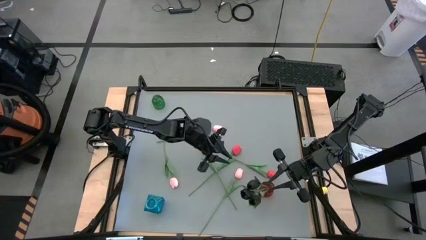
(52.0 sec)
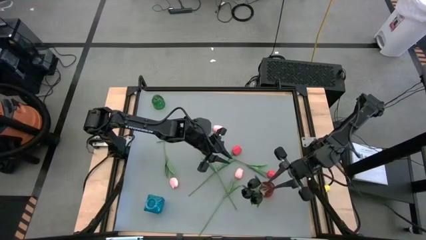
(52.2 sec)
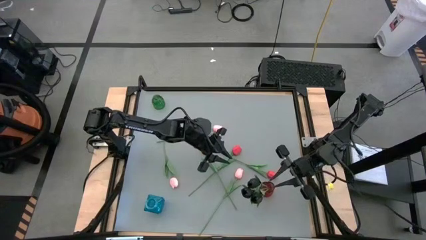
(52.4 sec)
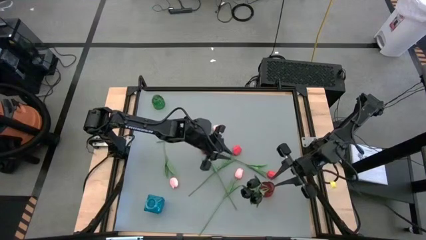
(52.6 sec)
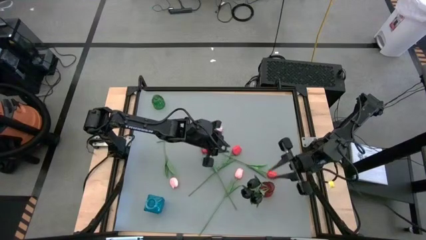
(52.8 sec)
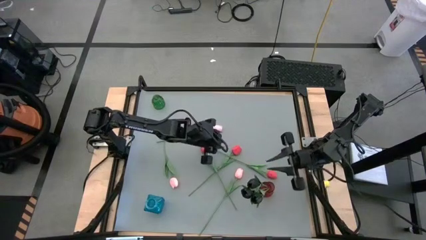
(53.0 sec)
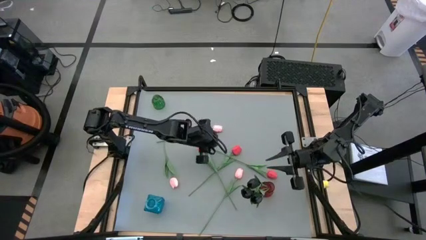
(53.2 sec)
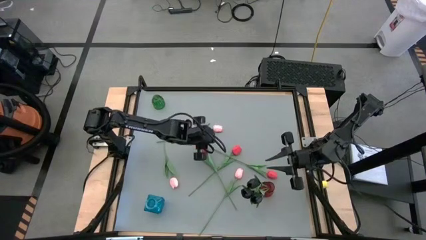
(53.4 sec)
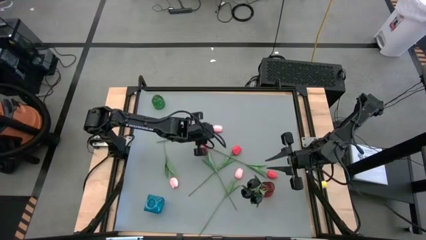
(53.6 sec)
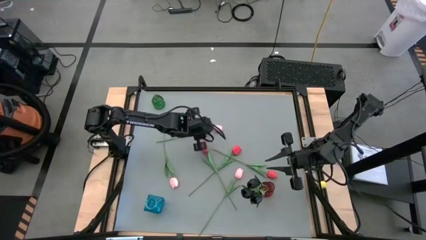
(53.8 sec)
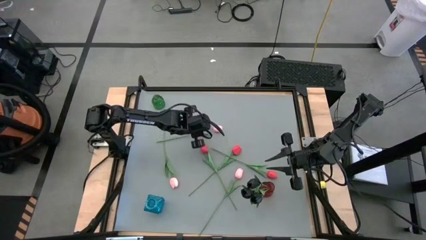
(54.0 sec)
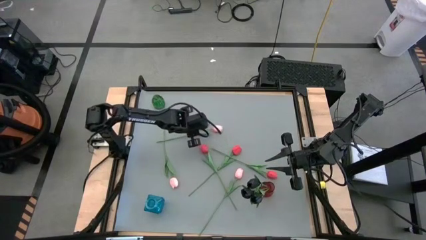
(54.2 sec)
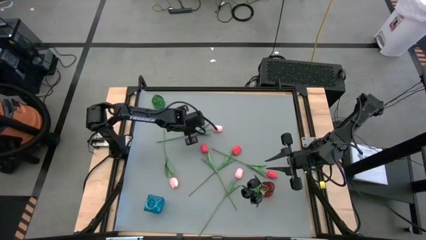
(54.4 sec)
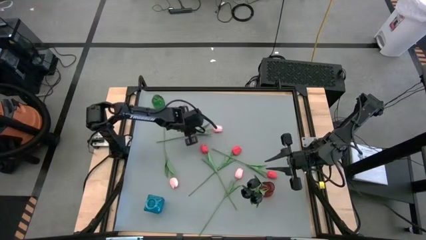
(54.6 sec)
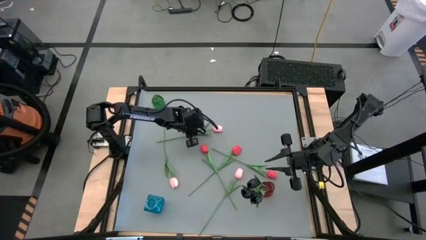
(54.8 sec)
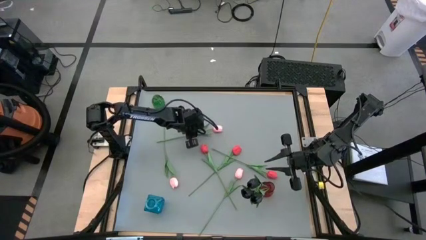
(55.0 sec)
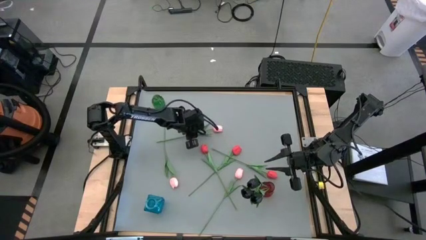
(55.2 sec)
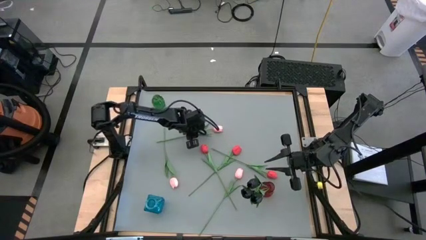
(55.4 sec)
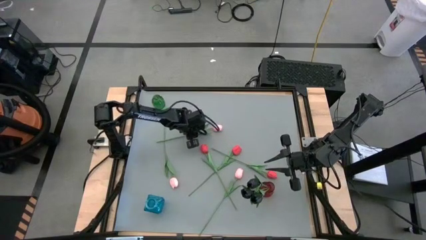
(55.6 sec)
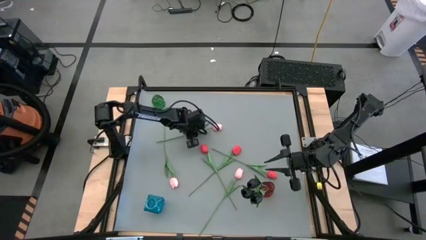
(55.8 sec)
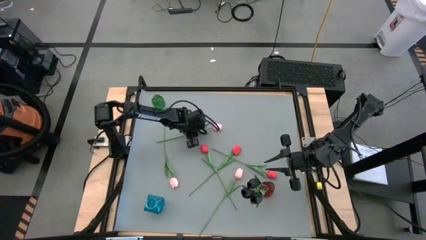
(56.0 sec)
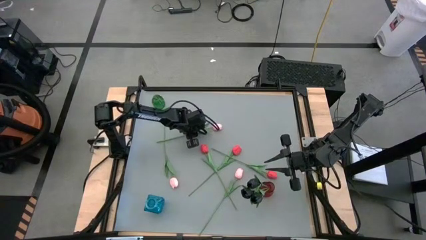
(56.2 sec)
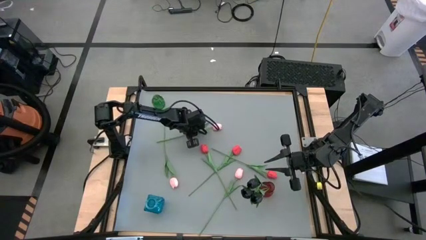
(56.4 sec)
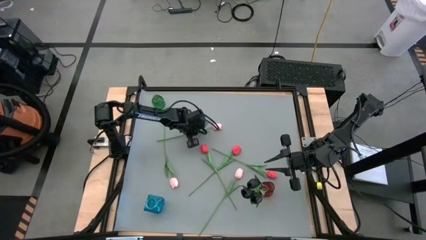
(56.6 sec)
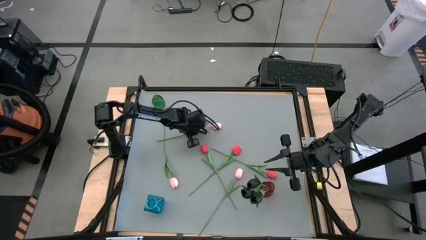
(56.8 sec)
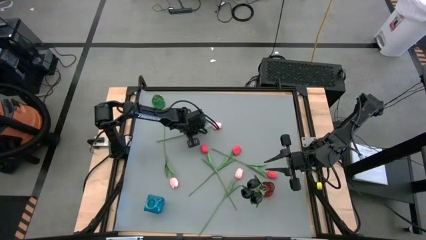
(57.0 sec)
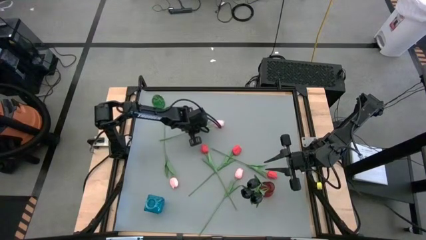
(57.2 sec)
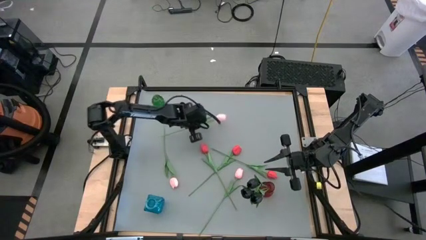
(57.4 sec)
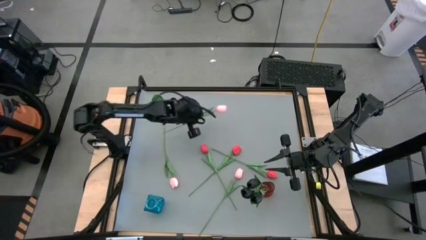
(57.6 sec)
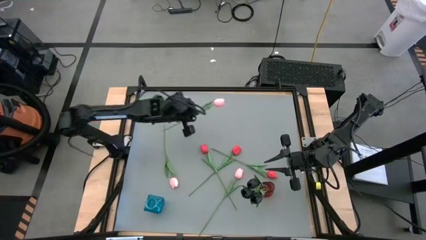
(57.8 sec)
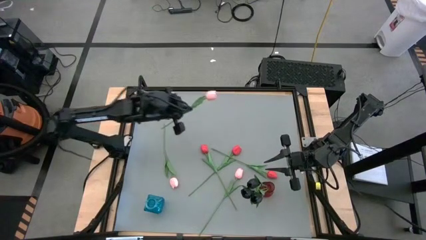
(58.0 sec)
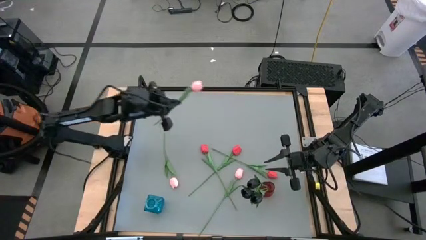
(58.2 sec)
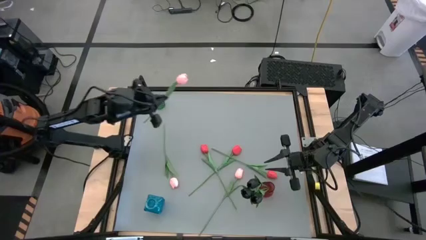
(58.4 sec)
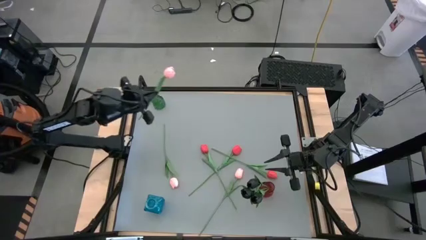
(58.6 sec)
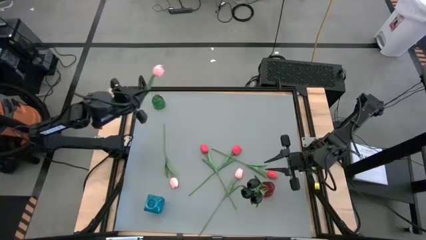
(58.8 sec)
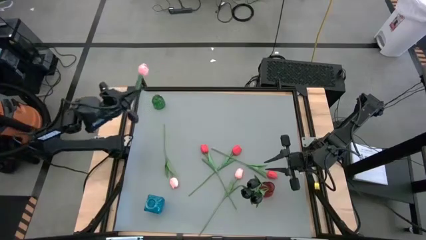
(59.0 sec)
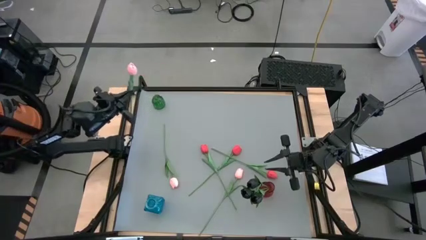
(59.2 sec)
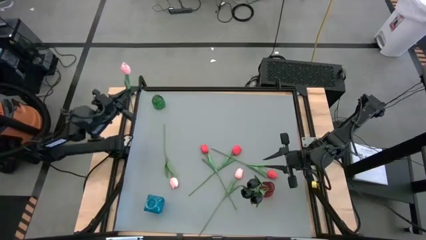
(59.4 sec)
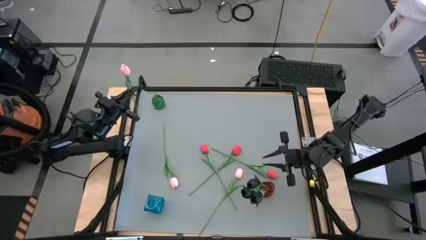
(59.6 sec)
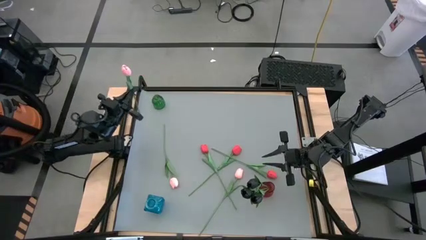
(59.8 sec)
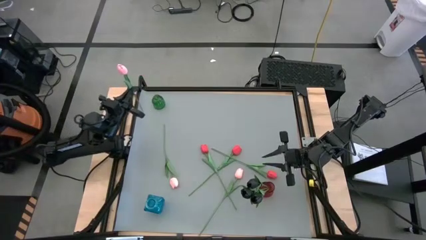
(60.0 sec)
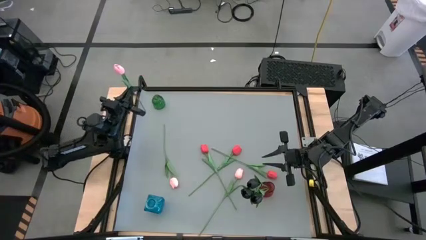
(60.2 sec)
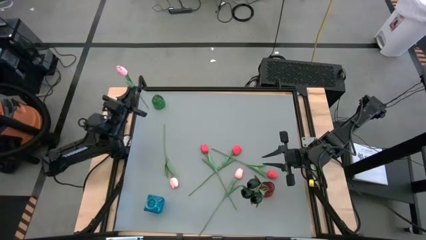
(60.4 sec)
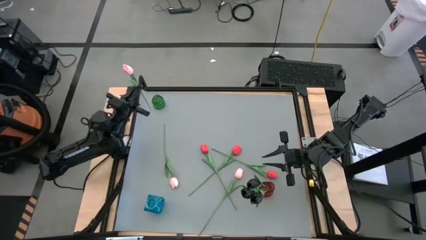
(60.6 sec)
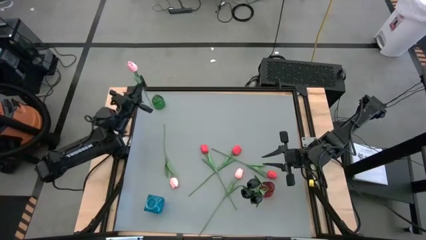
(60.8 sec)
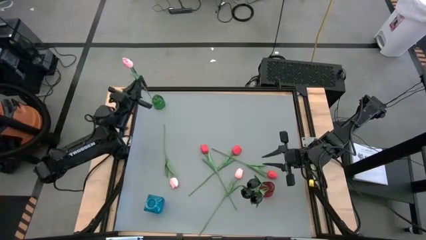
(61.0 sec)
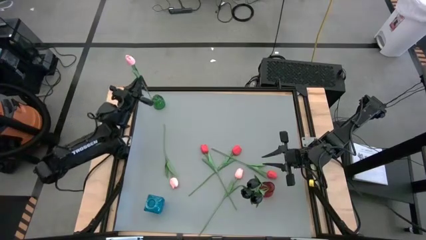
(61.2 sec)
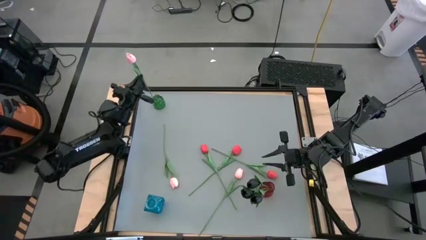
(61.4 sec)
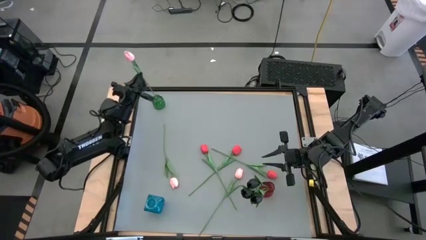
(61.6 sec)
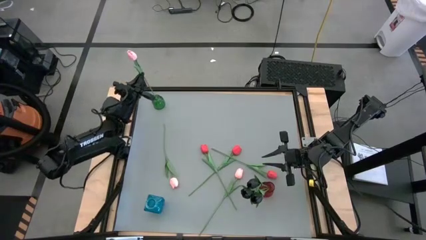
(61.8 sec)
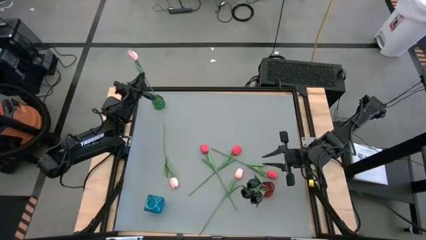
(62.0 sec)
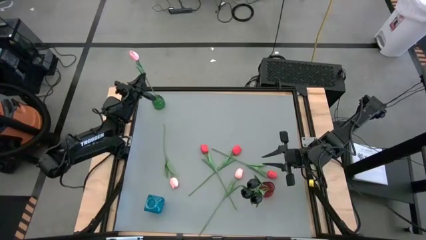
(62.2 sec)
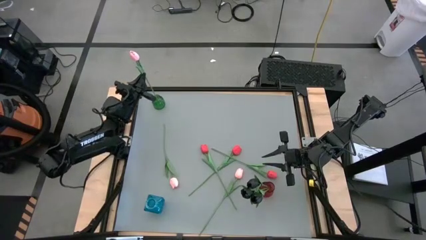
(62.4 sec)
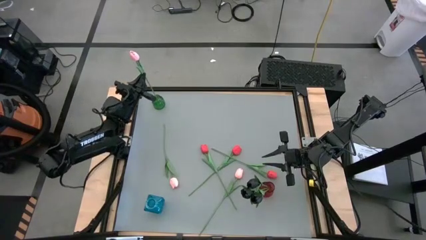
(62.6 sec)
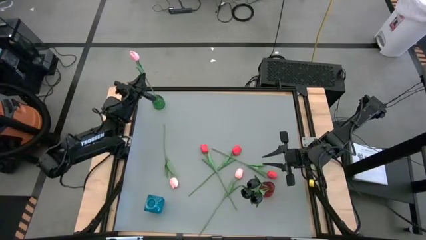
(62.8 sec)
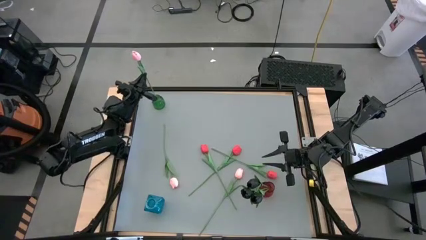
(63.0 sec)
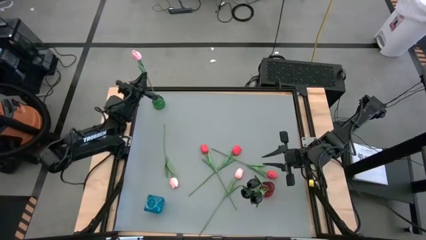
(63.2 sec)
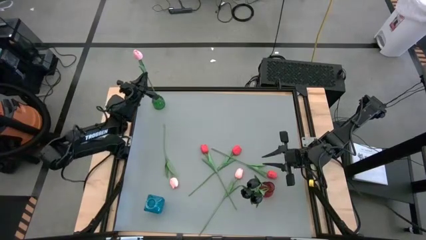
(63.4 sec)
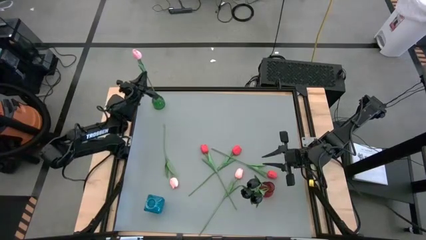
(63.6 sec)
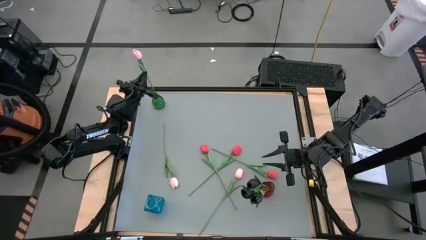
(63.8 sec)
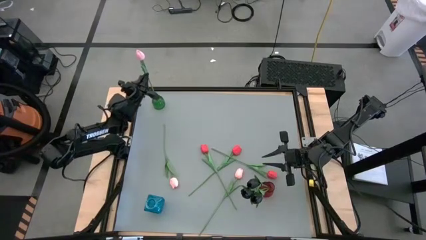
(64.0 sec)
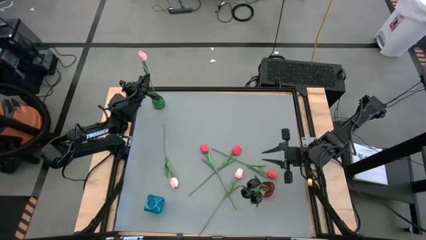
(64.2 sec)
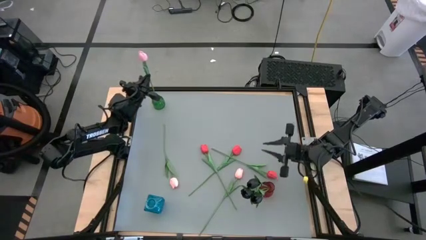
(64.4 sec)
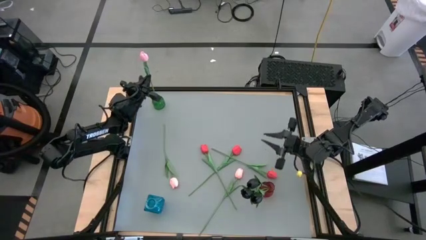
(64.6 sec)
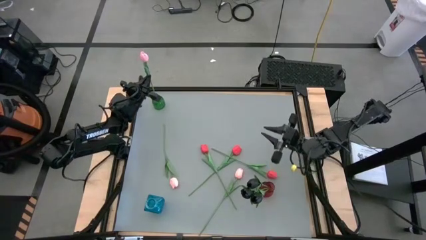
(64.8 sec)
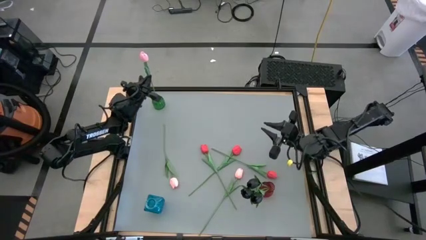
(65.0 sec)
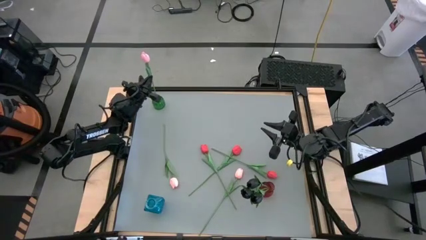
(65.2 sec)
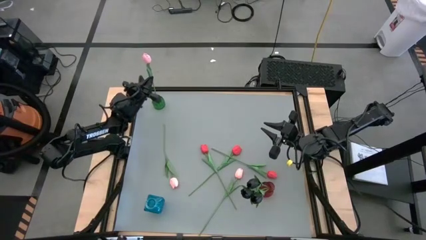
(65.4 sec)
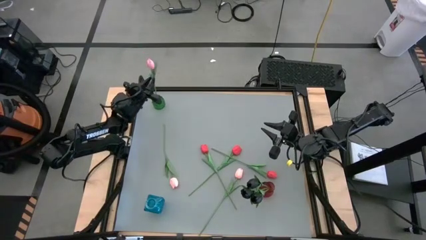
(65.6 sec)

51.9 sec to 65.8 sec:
Task: Sort flowers into vase by color
Put the top pink flower into the green vase
